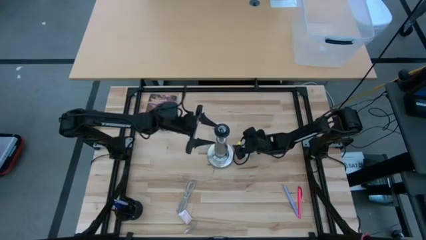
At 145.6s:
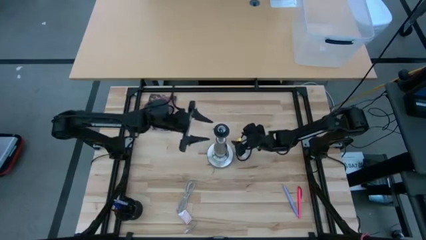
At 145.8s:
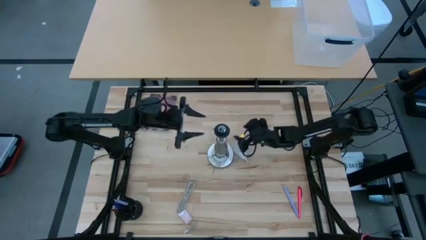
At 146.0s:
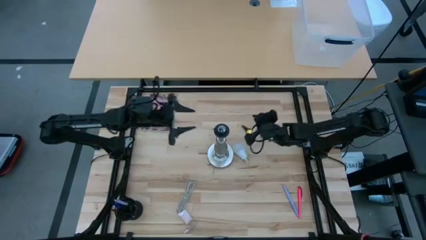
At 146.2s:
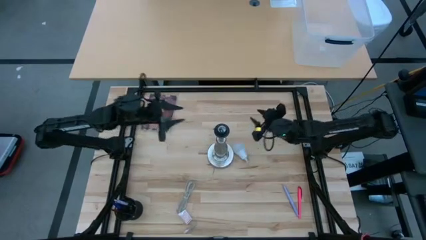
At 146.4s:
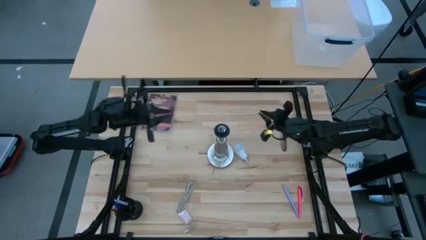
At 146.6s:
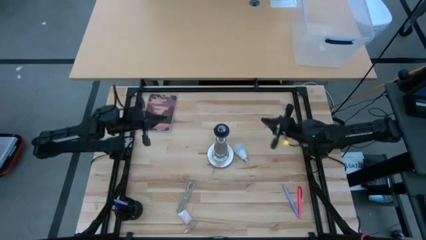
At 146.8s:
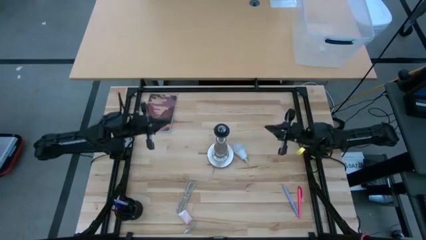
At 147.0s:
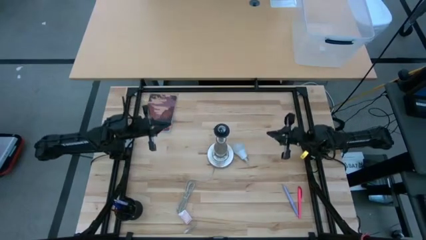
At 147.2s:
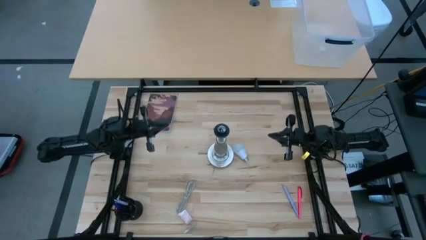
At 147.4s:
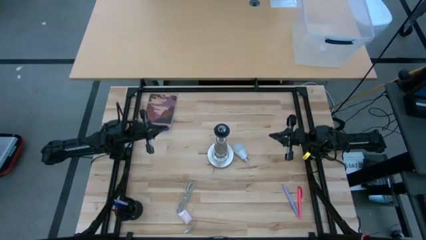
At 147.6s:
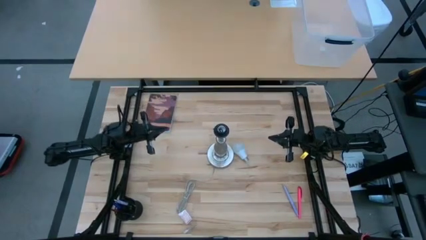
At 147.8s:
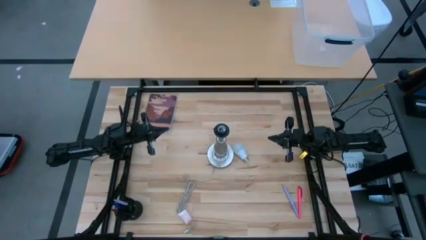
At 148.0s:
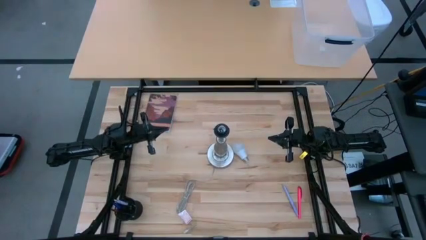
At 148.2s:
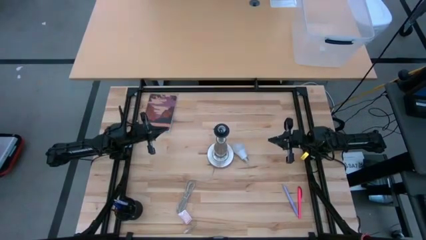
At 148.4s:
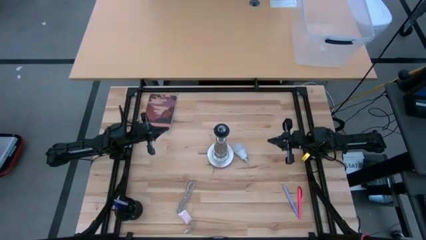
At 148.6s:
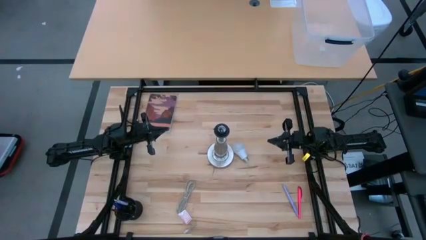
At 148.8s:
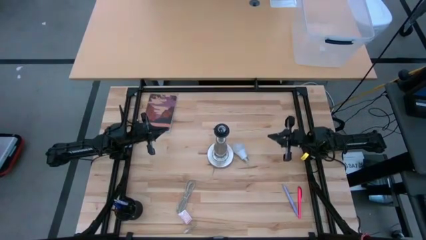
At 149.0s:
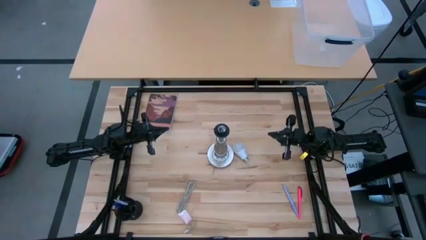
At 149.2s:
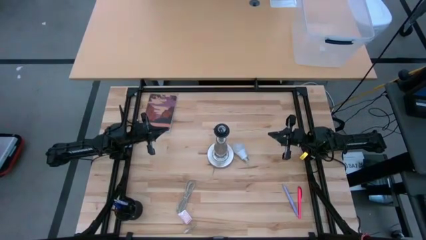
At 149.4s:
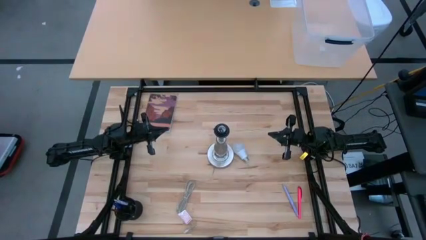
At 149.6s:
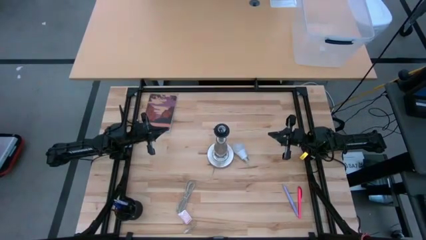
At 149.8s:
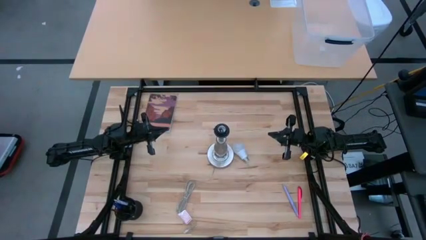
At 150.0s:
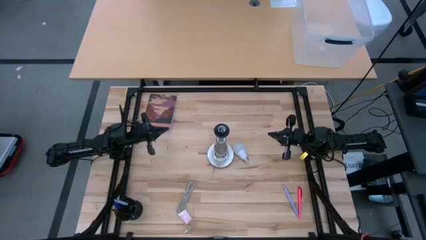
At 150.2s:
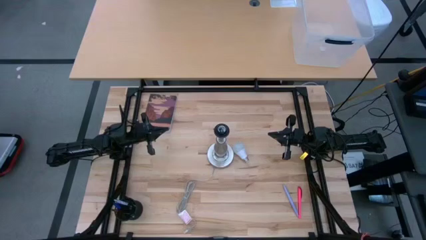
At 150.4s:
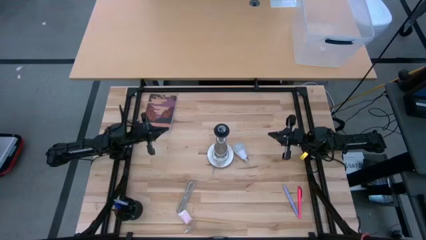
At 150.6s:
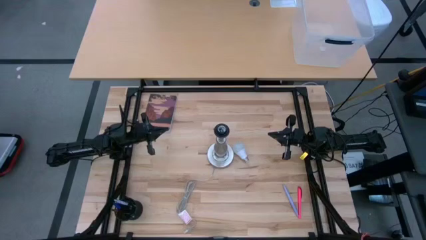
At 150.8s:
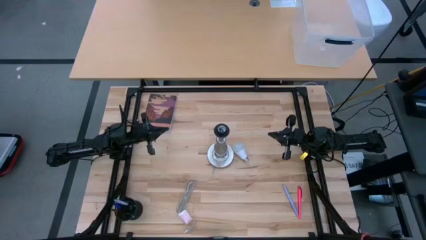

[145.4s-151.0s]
Task: Screw lightbulb
Return to Home Position

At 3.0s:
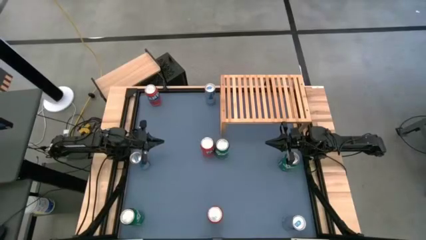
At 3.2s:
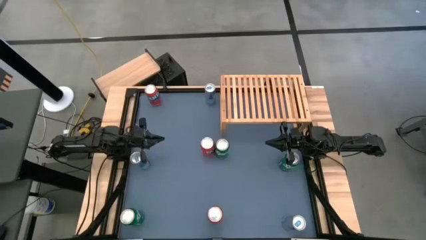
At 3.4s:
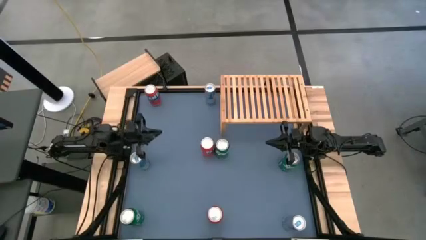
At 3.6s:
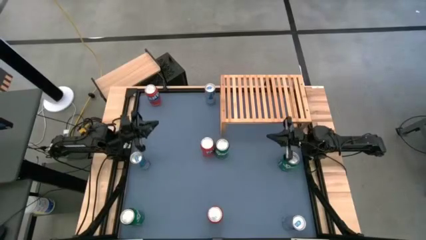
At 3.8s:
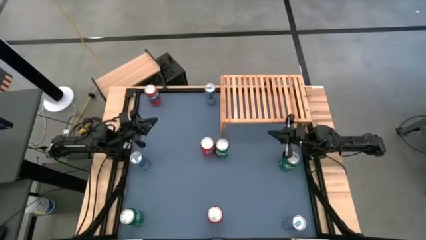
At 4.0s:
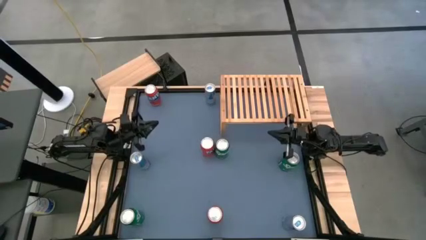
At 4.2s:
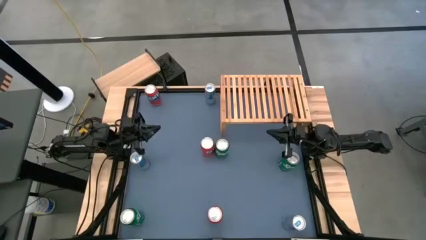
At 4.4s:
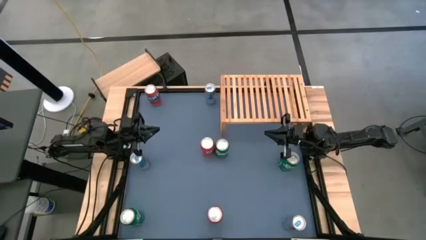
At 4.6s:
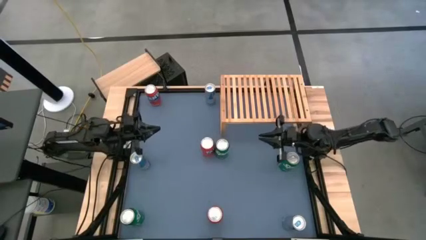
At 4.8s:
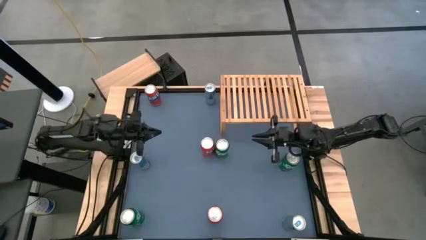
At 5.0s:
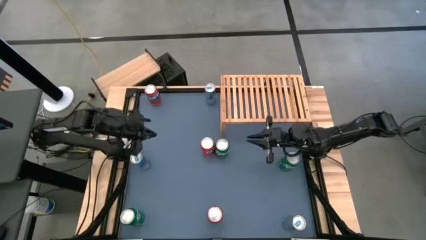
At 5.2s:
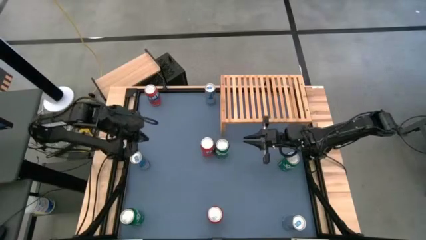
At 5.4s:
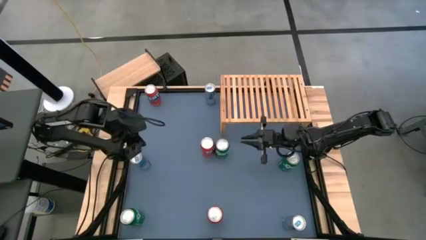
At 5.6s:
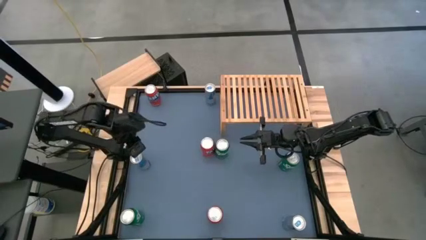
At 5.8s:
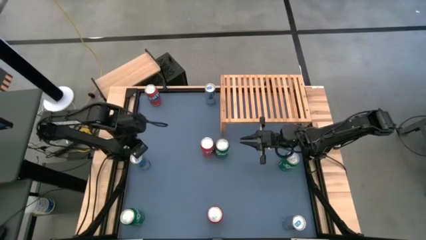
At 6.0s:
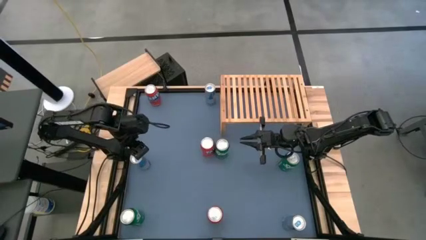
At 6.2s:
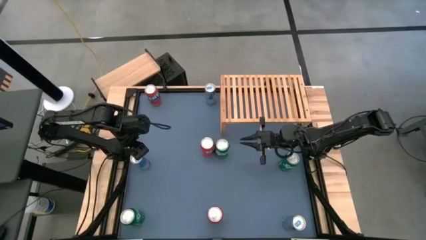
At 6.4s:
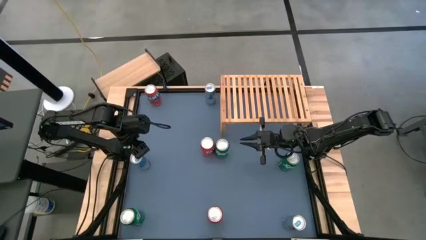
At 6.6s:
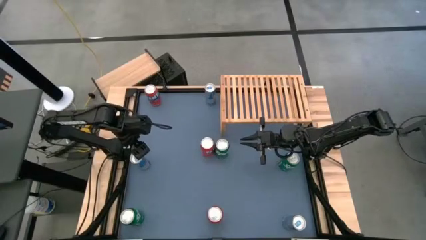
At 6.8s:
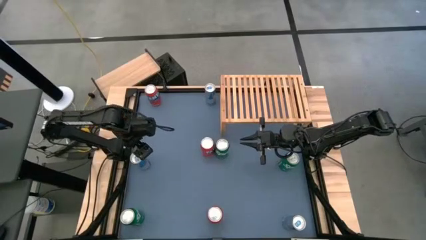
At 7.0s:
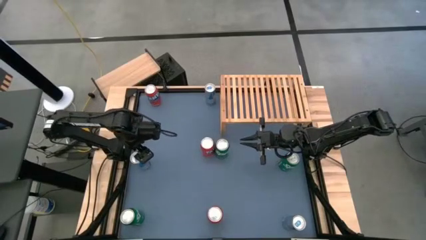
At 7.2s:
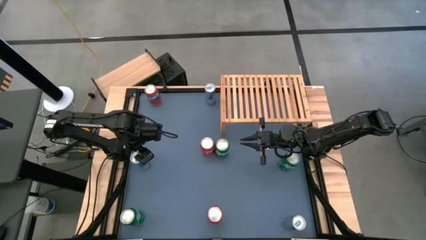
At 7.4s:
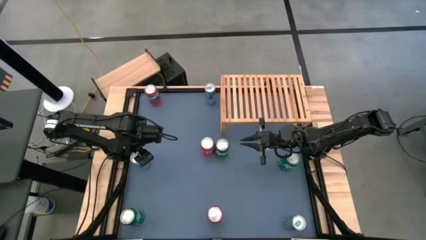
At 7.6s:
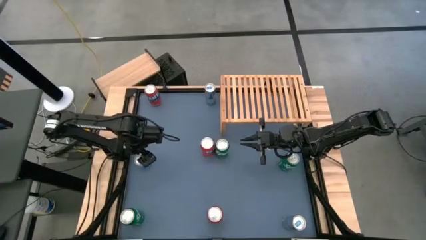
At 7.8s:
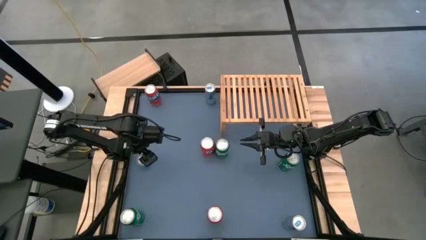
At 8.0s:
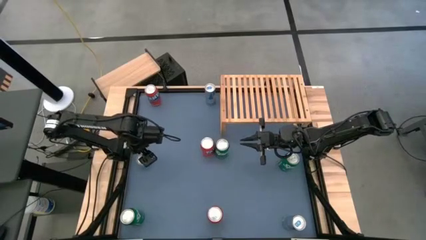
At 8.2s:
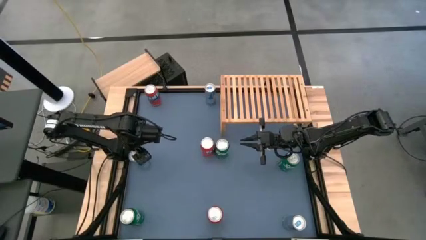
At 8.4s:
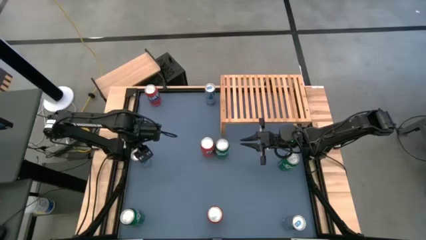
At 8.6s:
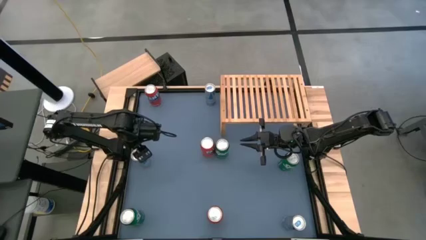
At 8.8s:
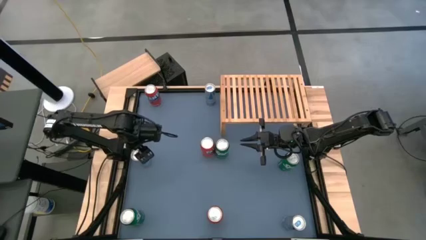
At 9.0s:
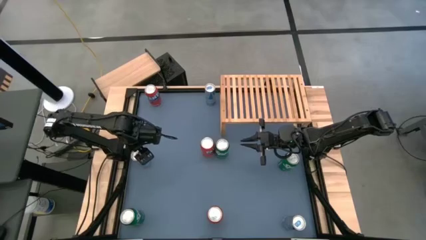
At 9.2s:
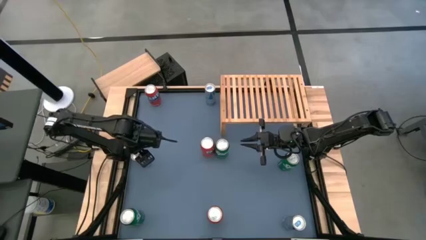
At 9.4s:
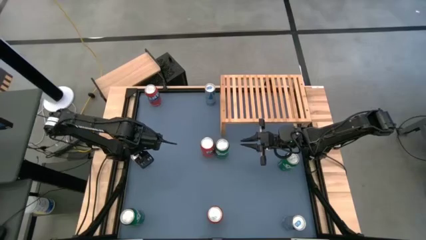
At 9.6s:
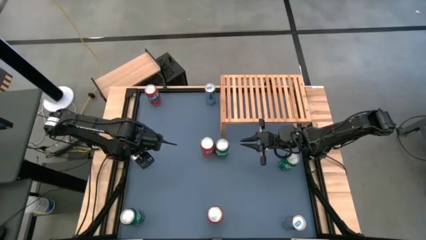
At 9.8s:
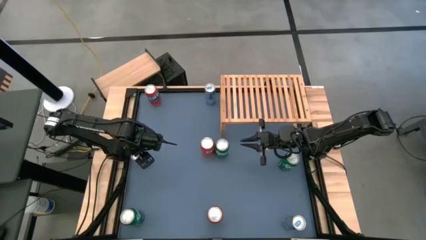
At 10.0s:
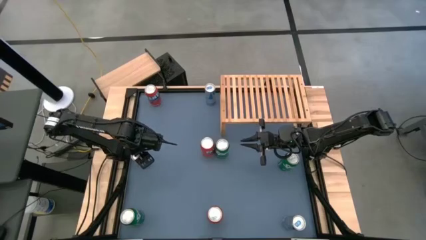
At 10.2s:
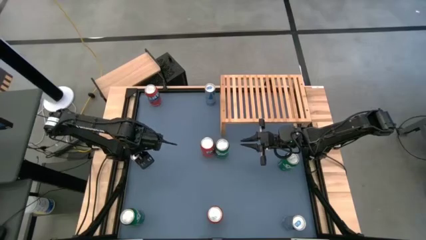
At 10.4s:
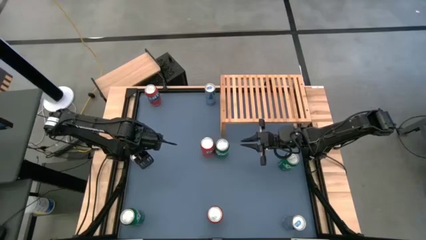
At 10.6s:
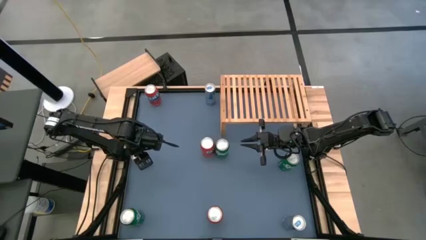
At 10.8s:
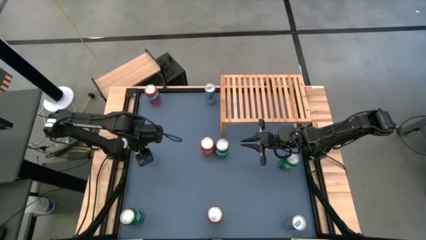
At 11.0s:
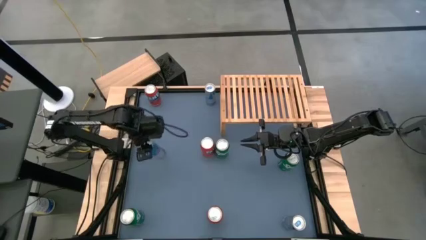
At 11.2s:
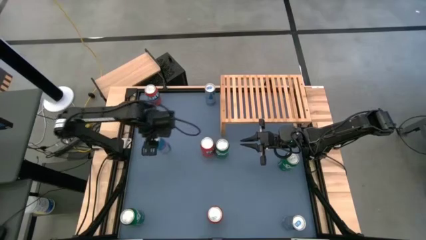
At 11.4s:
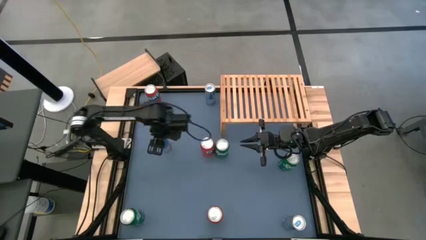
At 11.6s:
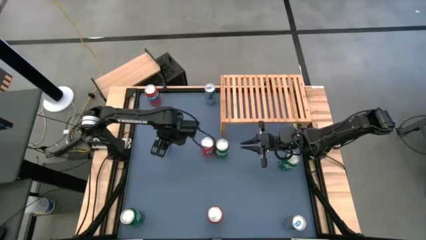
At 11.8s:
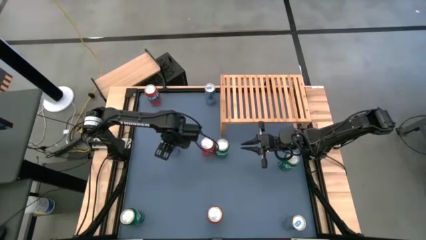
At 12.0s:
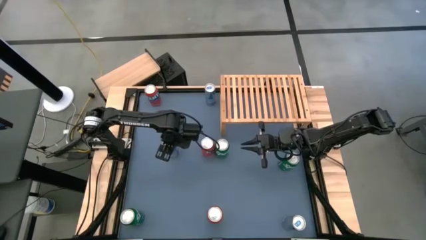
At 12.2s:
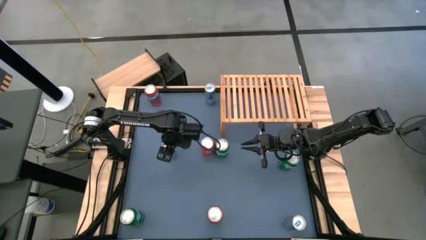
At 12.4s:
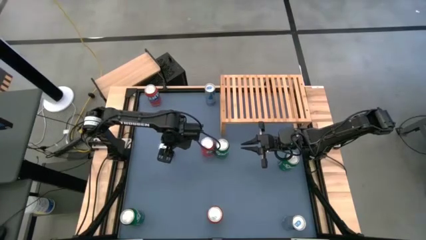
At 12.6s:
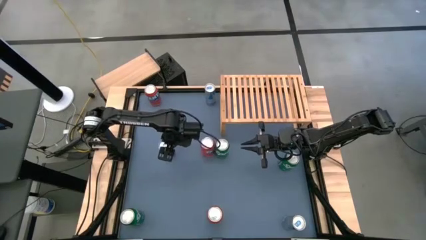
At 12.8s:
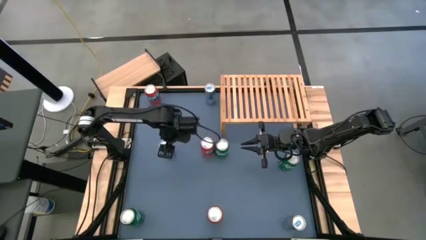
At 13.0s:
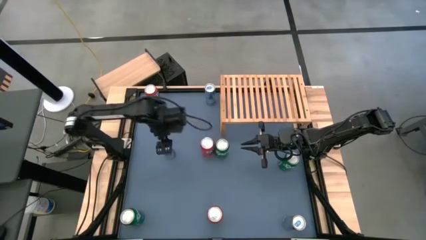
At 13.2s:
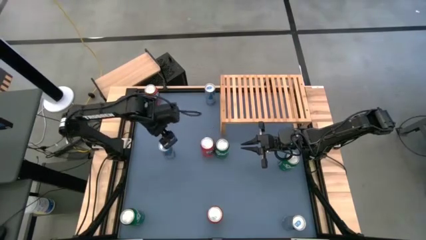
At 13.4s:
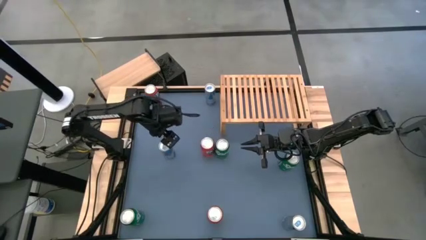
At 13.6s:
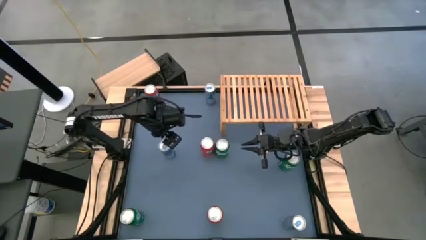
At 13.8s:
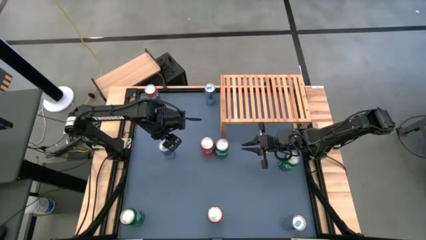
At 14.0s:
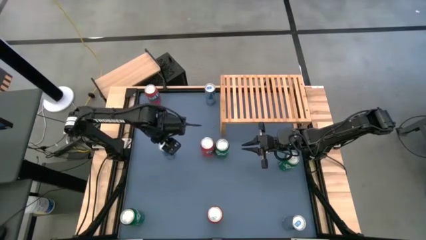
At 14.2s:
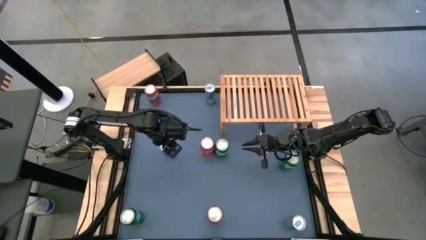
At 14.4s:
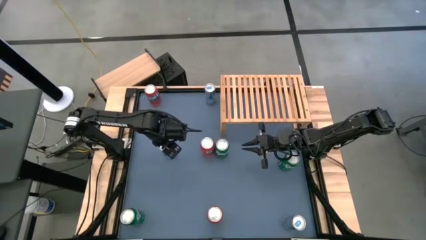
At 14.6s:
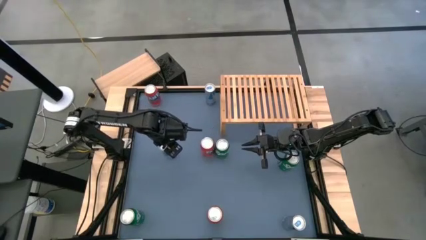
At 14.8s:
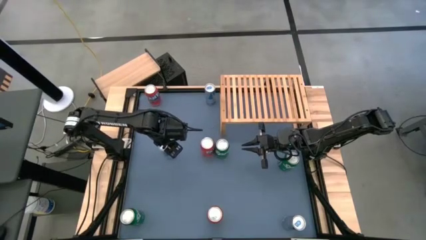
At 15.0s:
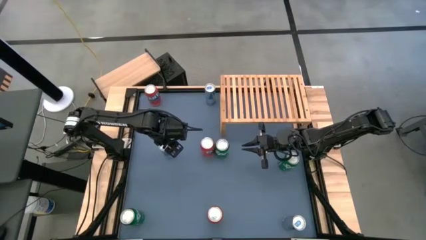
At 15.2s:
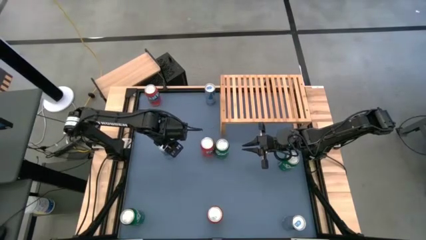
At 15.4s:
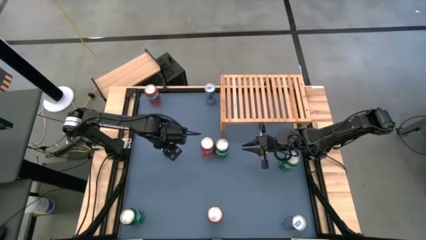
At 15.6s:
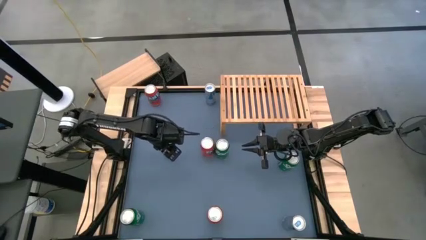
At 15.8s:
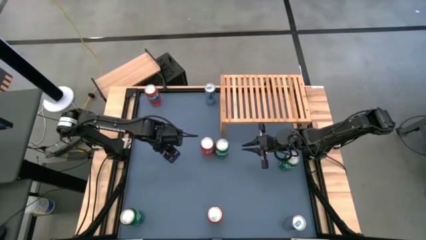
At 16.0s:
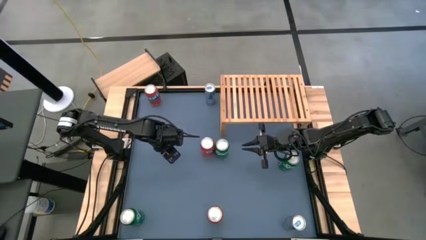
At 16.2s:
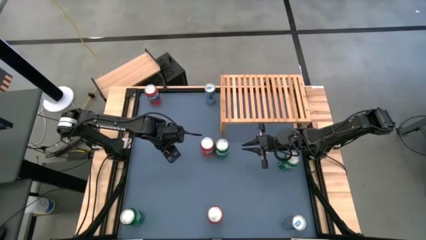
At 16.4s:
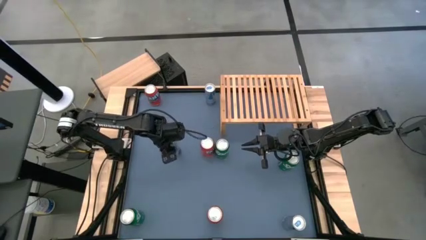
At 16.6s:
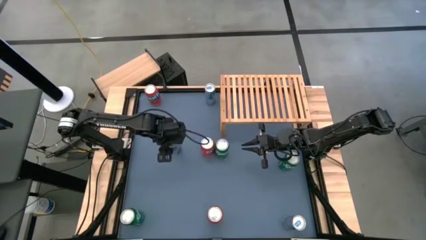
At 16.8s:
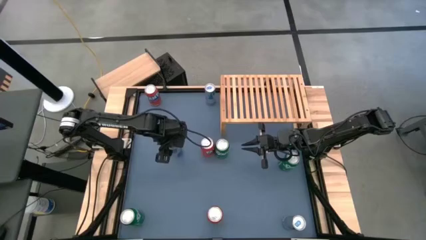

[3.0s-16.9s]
Task: Place canned beverage on shelf
Put the middle left blue soda can on the shelf
